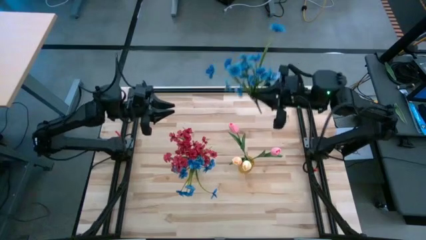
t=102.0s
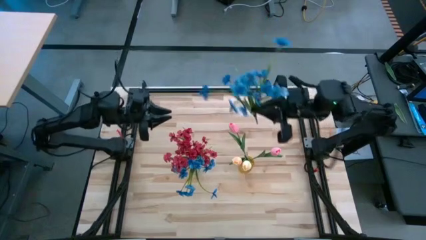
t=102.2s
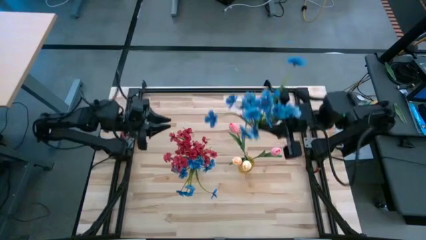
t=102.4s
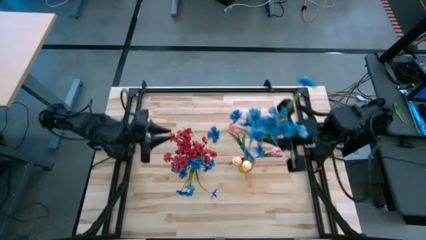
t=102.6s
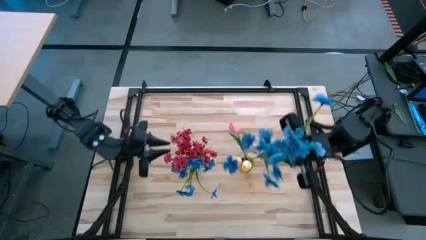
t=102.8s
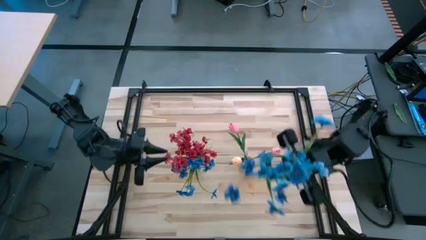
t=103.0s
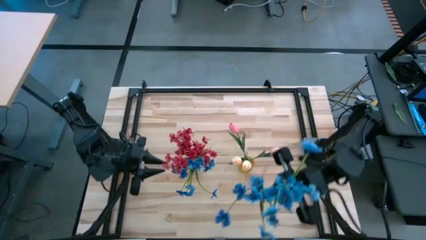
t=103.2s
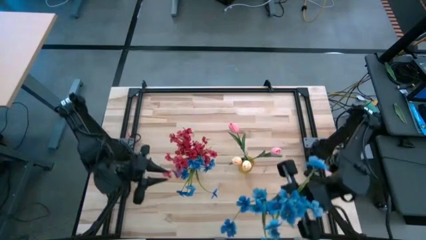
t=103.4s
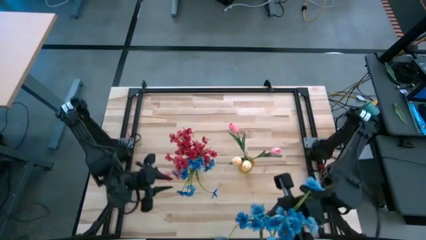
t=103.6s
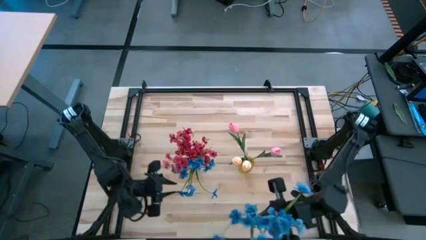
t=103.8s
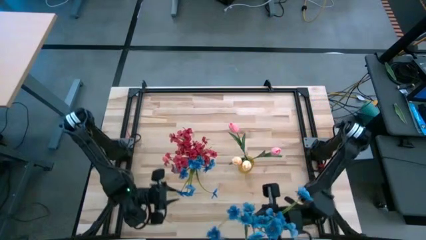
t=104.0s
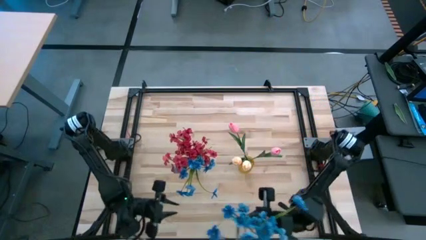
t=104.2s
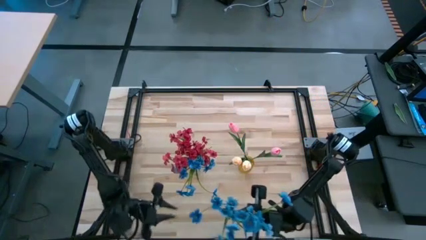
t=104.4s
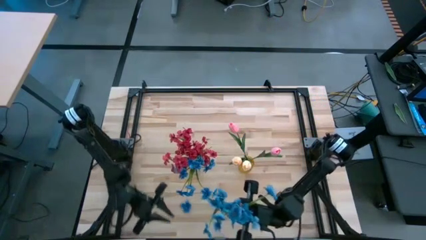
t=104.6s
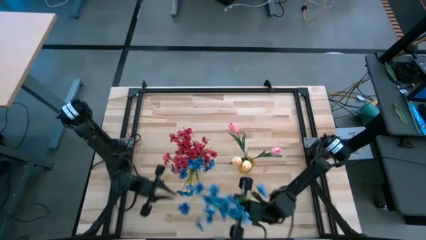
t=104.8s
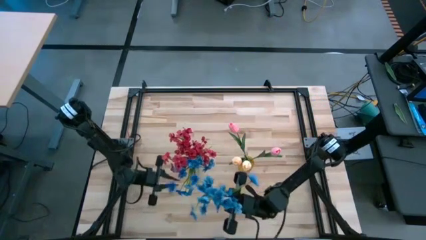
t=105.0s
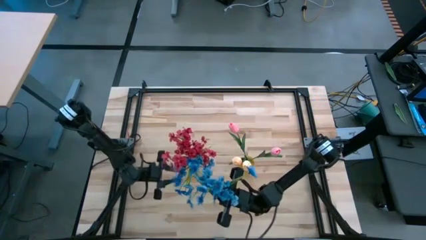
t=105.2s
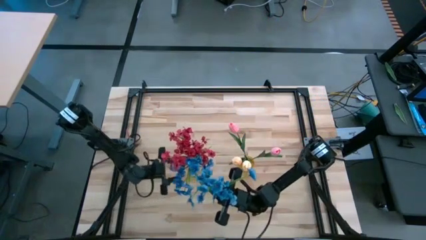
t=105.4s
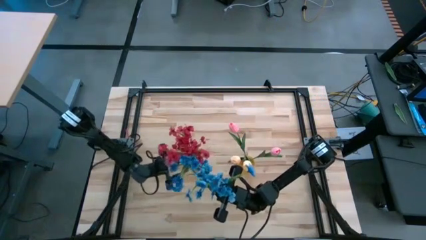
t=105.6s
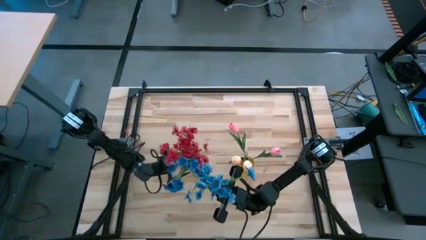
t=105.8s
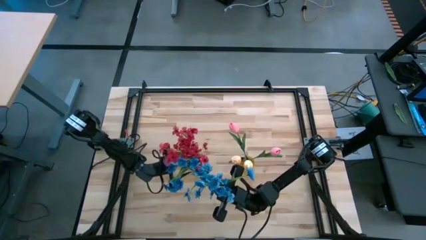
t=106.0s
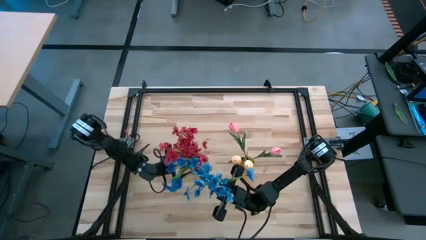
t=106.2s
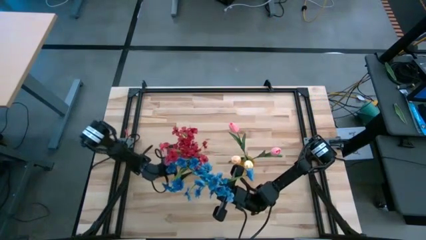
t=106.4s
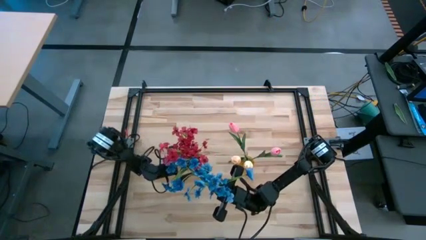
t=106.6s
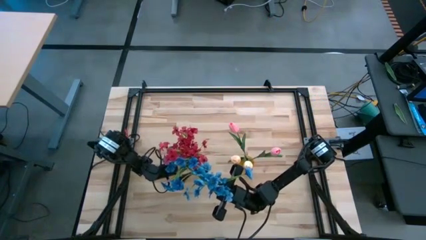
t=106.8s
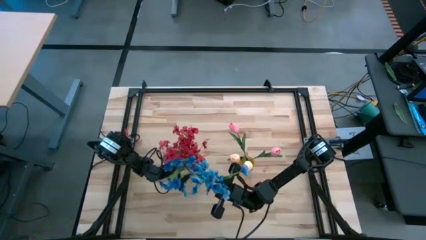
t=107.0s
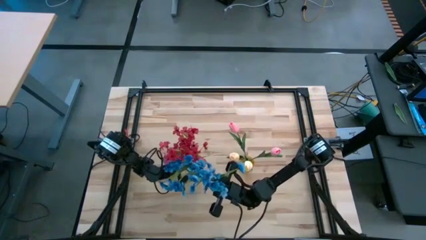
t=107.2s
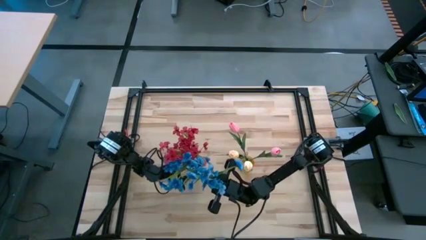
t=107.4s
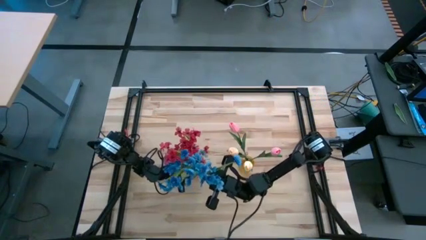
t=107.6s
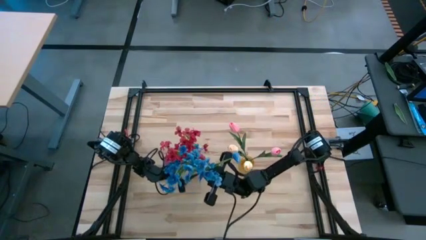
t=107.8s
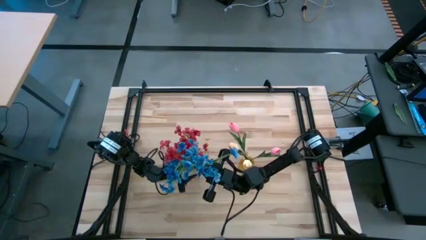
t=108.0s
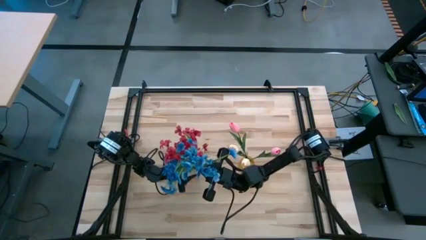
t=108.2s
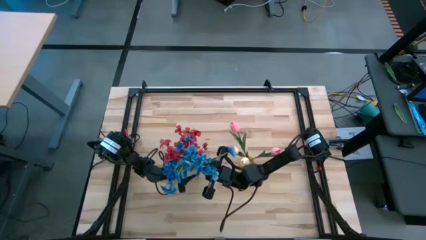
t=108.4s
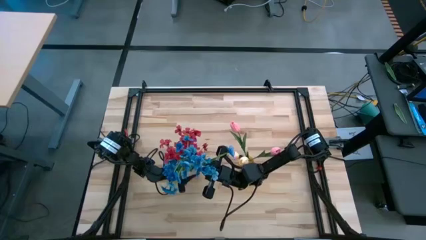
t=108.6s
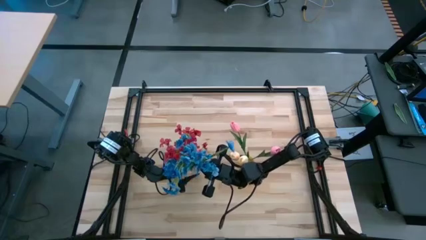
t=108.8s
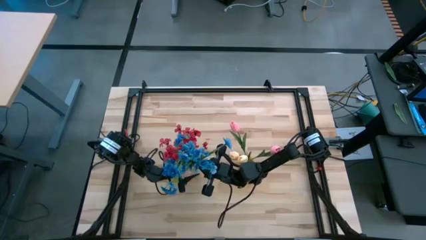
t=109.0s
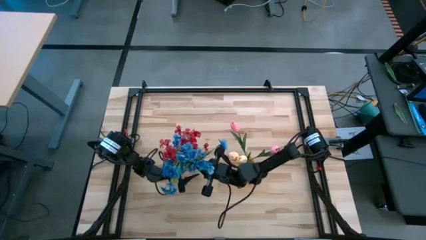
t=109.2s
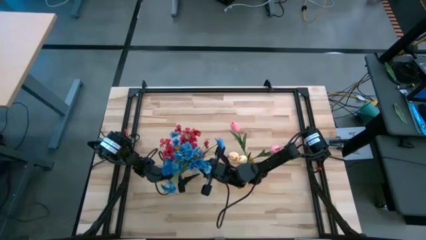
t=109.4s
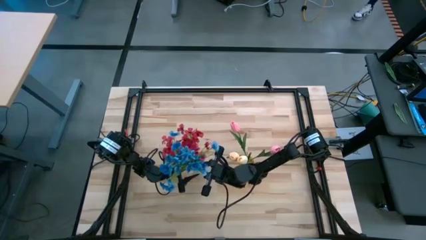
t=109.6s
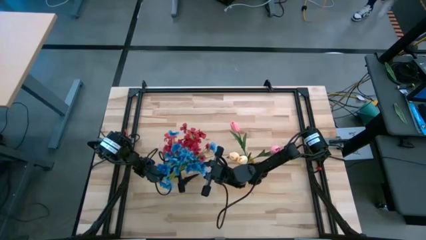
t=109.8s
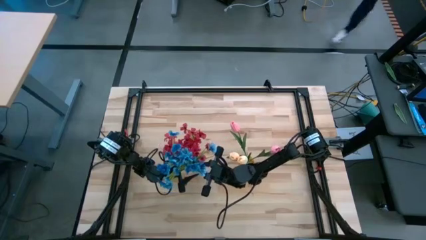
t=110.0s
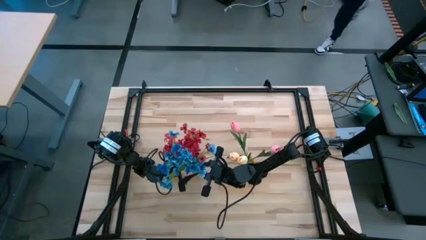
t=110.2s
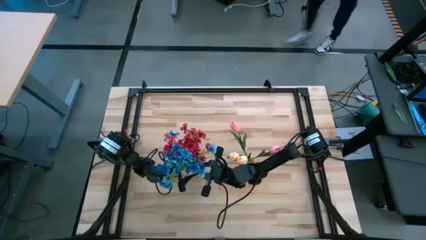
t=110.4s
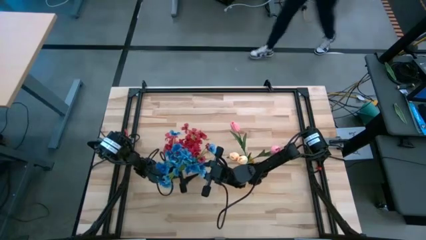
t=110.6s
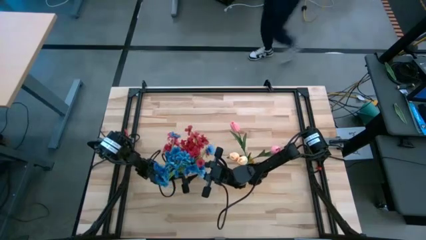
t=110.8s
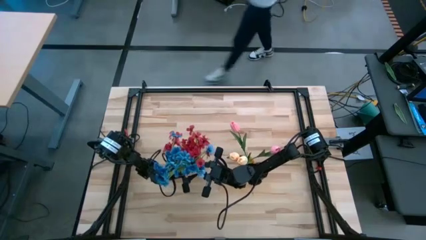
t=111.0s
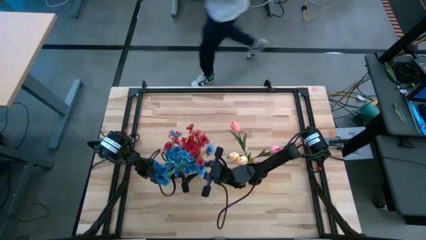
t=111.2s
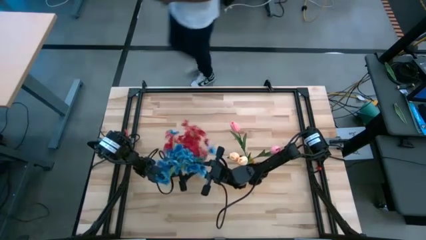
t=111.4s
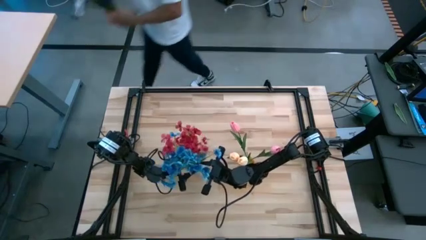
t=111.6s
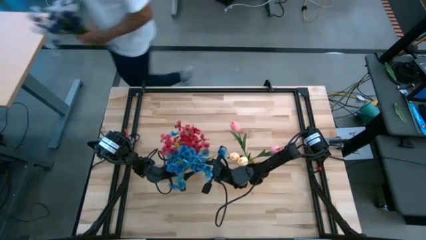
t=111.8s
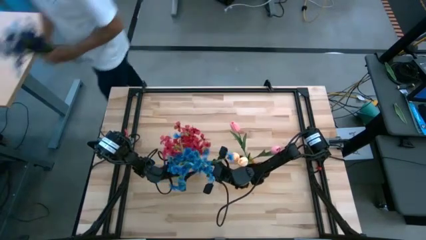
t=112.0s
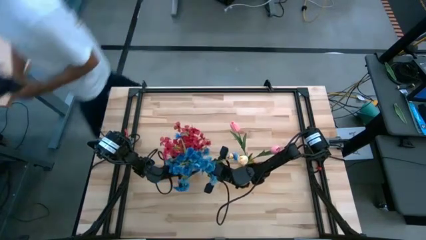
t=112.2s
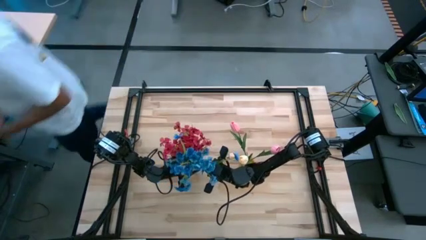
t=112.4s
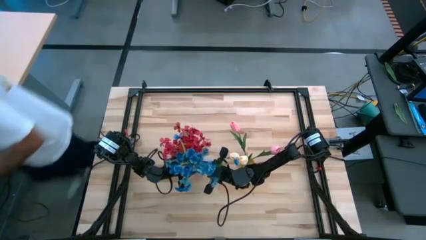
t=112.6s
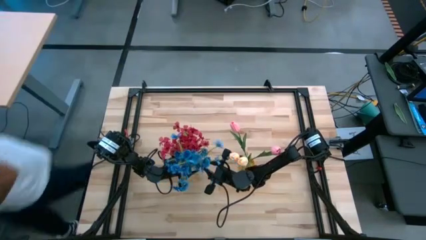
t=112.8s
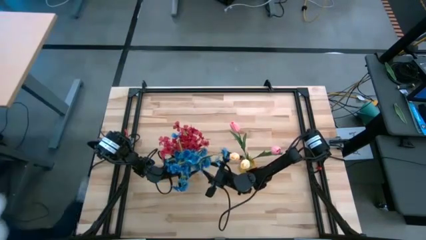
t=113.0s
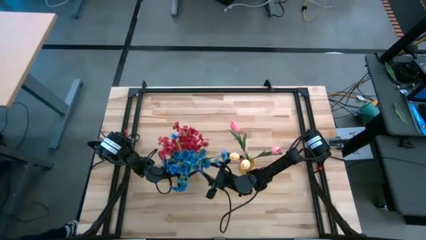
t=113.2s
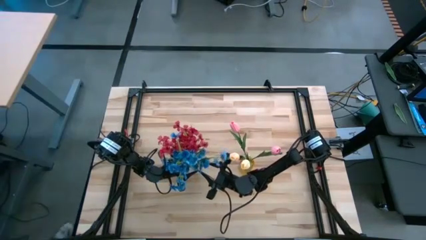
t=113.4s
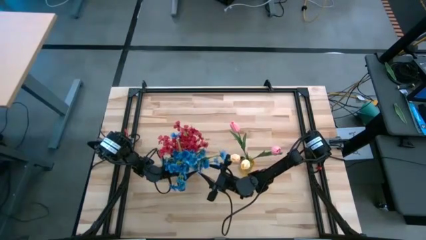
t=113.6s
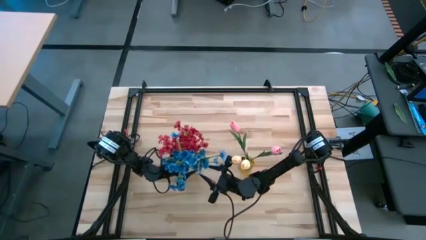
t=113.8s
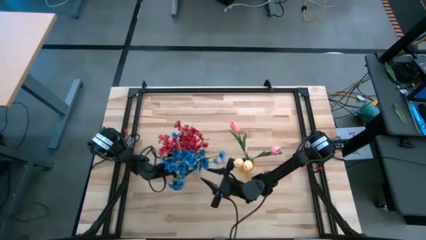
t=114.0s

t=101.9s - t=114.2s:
Task: Sort flowers into vase by color
Put the blue flower into the transparent vase

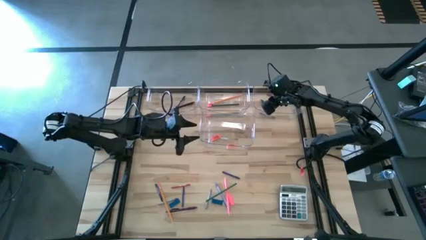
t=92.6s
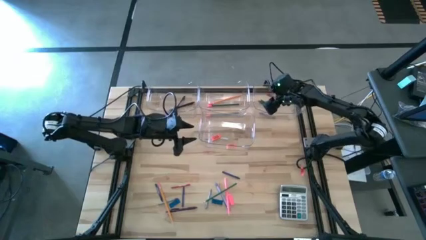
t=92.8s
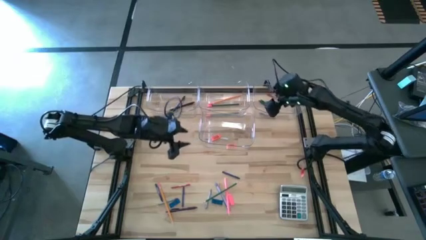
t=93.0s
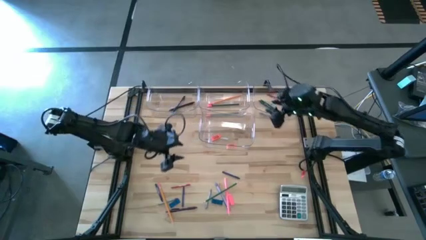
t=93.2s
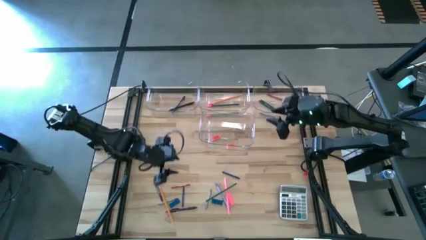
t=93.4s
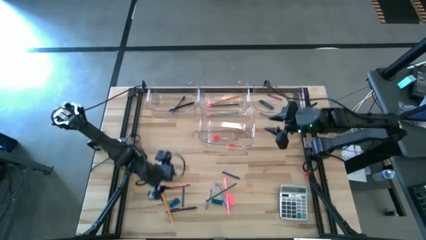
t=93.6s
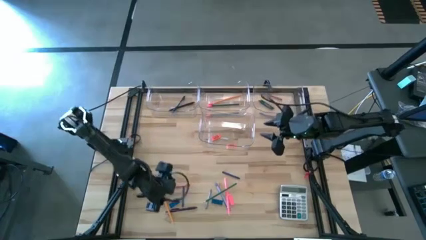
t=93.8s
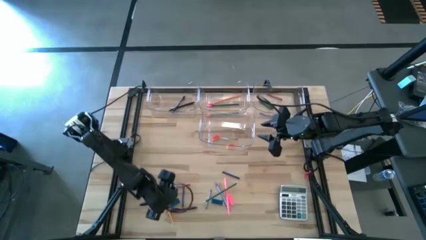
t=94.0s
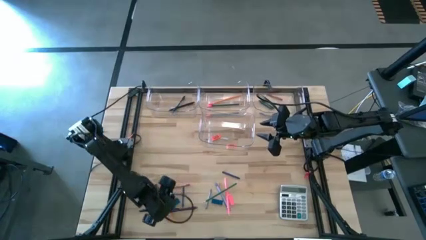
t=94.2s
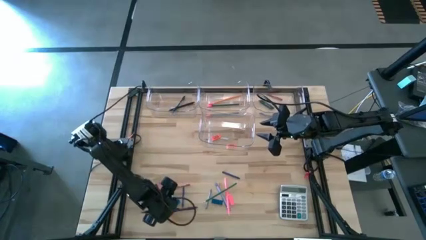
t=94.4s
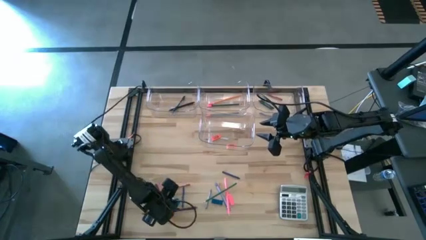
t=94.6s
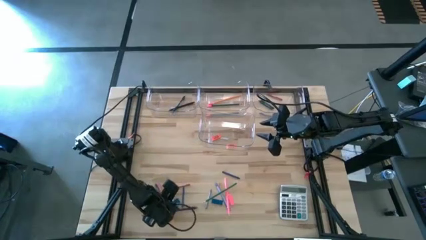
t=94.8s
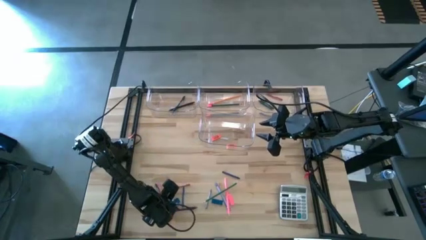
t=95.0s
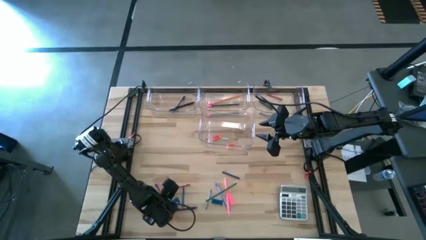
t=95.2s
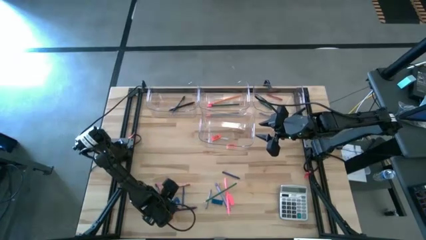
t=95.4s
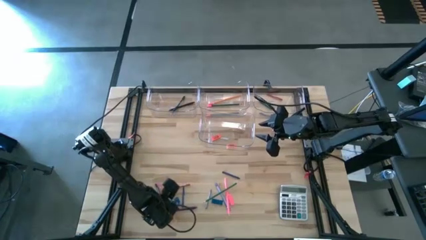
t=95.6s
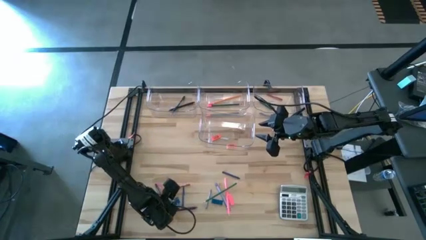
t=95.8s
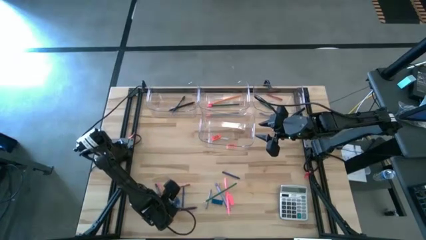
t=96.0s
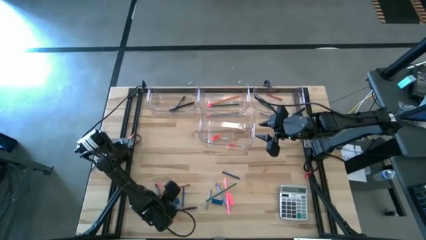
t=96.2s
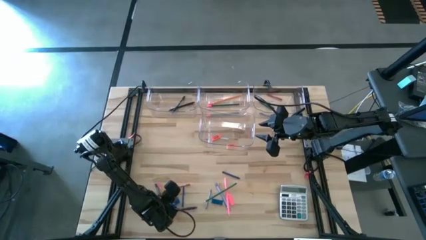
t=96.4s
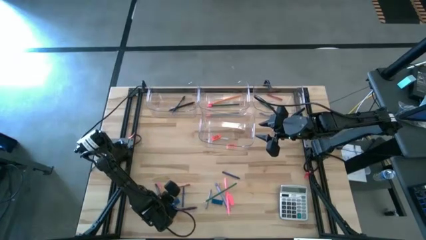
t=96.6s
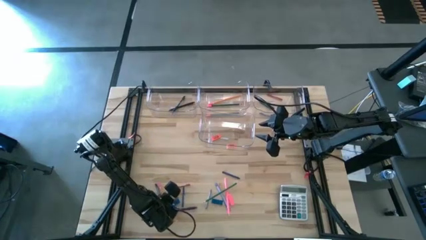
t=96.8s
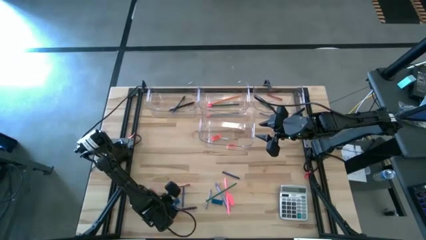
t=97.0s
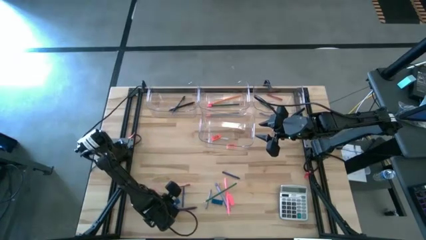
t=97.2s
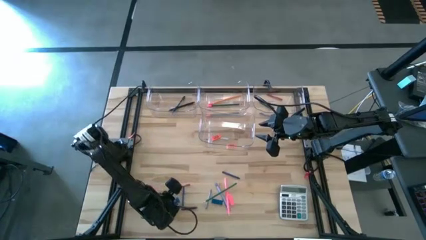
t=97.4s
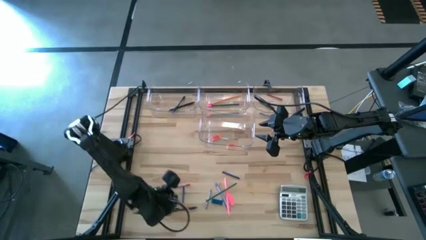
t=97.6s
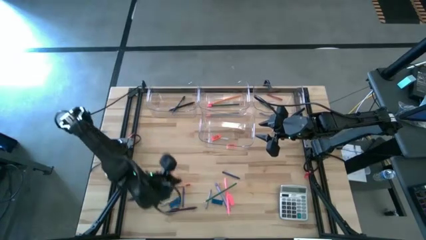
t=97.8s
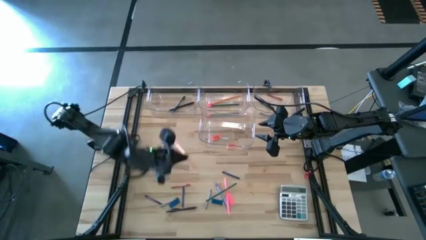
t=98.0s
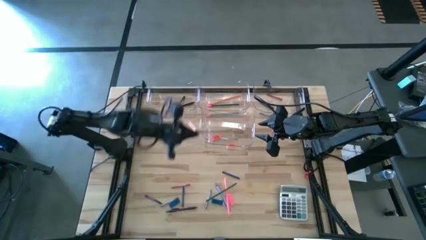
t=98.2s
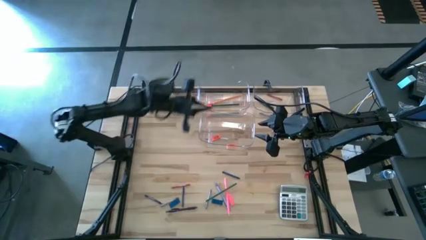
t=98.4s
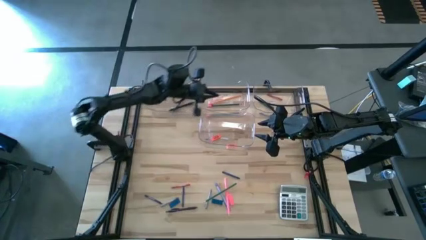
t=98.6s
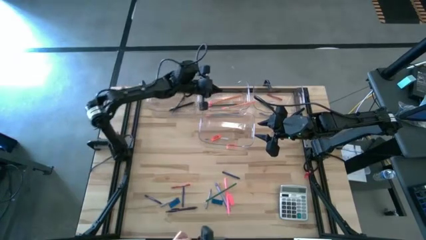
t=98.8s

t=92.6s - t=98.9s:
Task: Sort crayons/erasers/pens/pencils in bins
Put the orange pencil into the top center transparent bin
